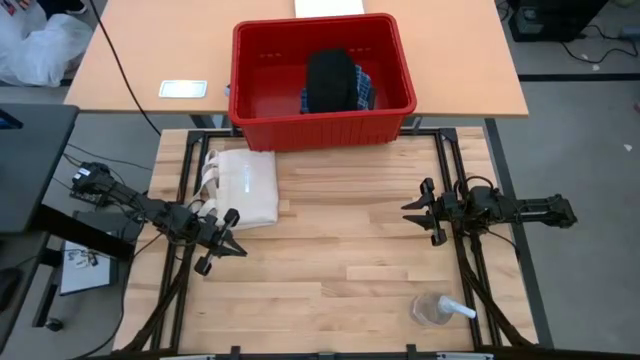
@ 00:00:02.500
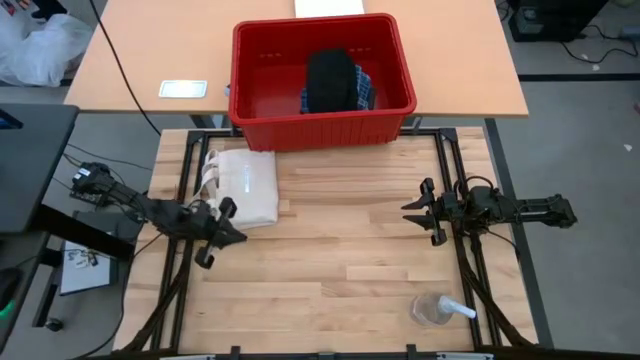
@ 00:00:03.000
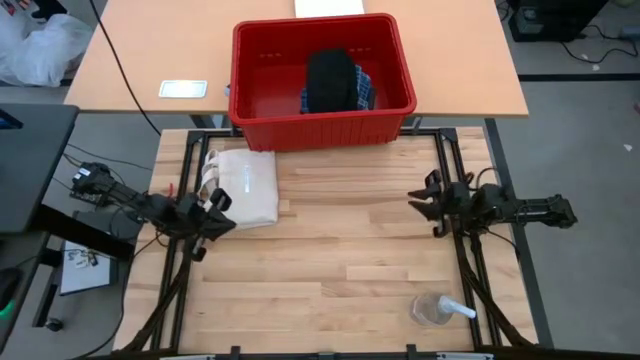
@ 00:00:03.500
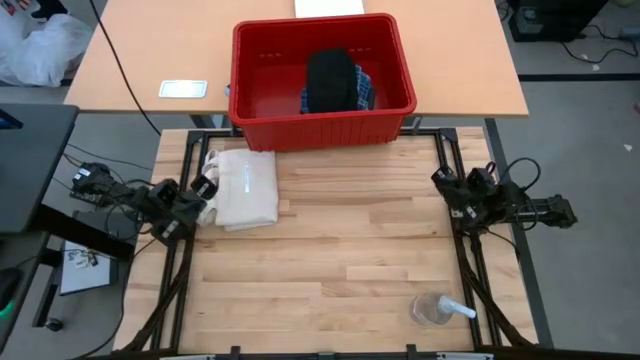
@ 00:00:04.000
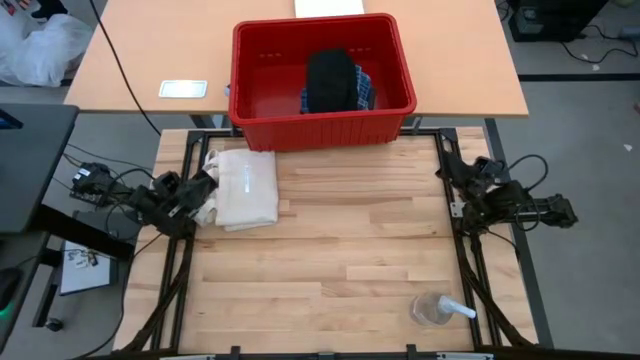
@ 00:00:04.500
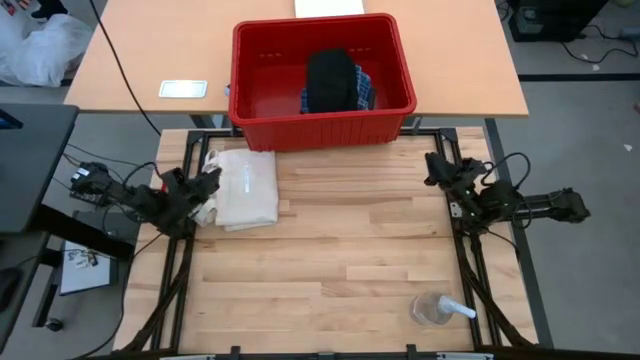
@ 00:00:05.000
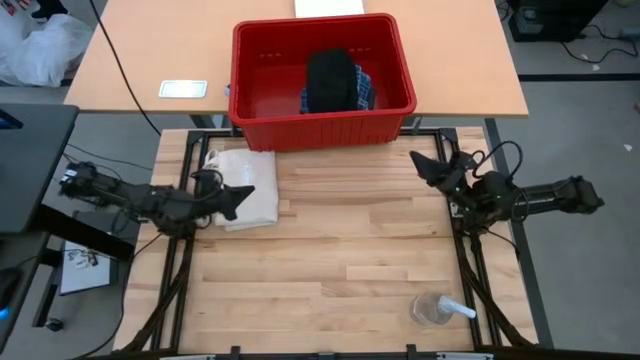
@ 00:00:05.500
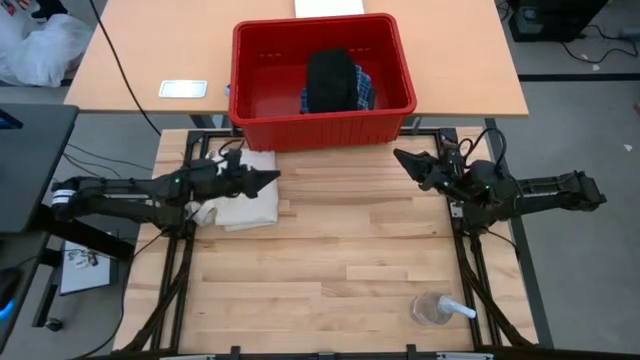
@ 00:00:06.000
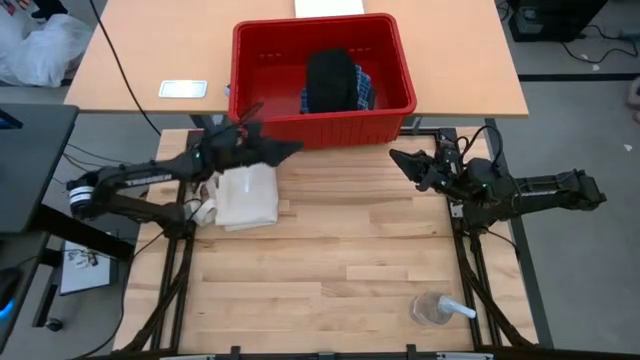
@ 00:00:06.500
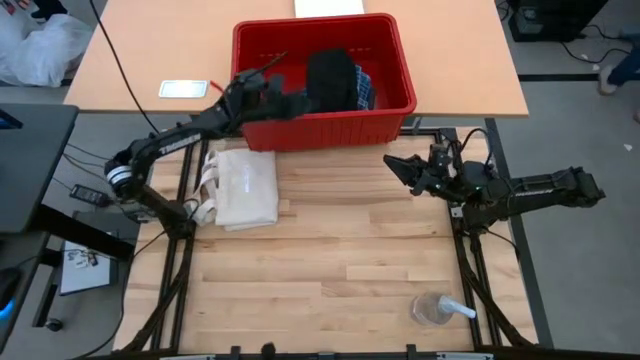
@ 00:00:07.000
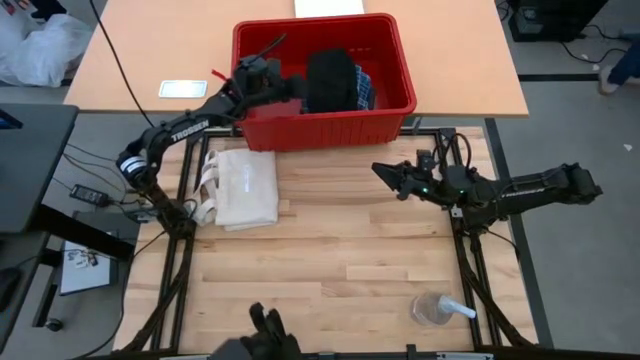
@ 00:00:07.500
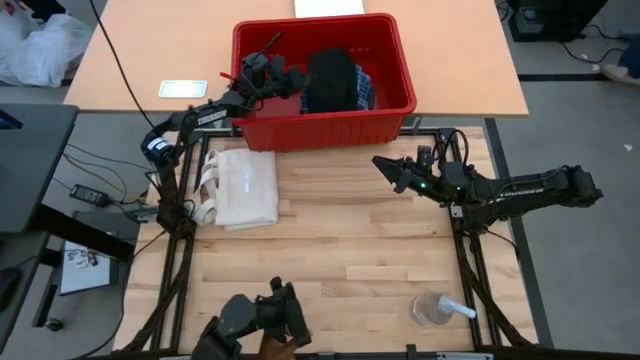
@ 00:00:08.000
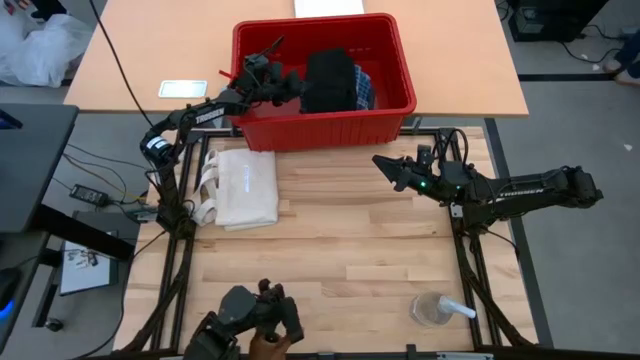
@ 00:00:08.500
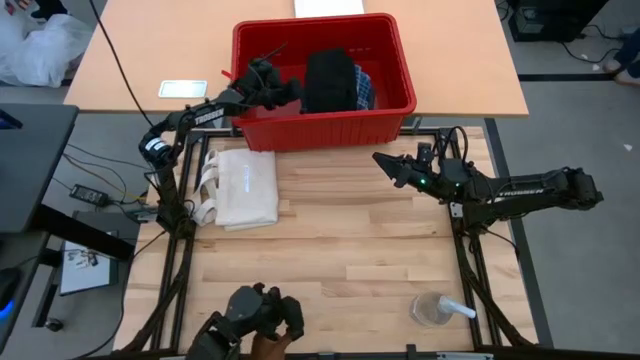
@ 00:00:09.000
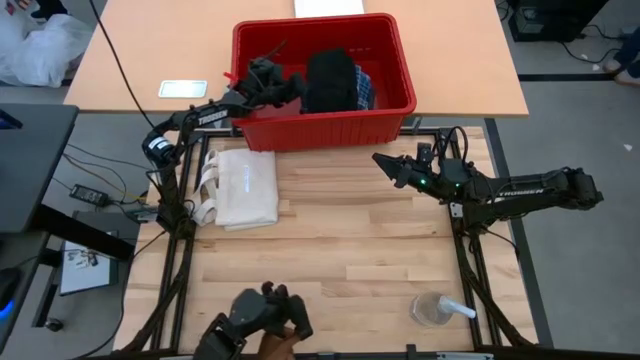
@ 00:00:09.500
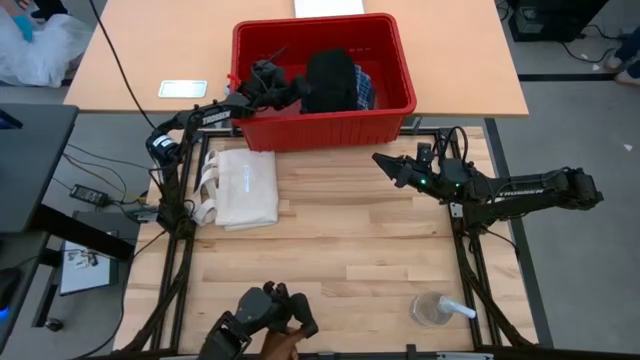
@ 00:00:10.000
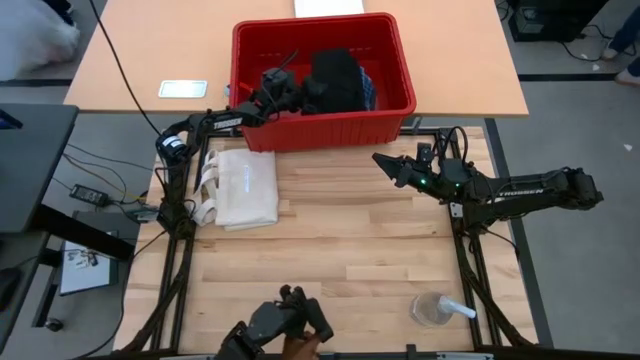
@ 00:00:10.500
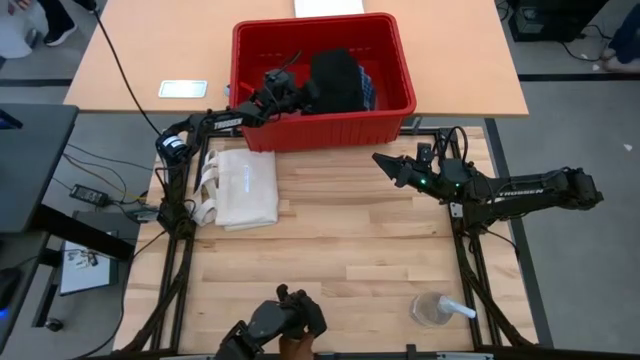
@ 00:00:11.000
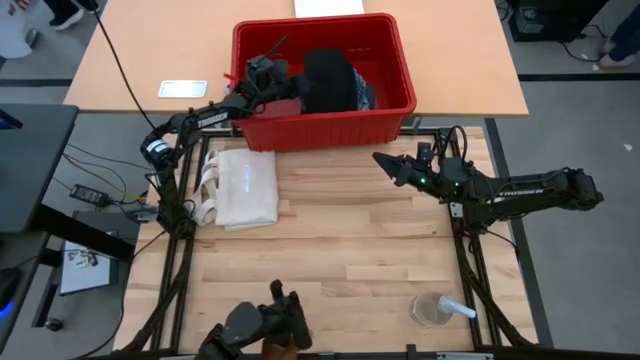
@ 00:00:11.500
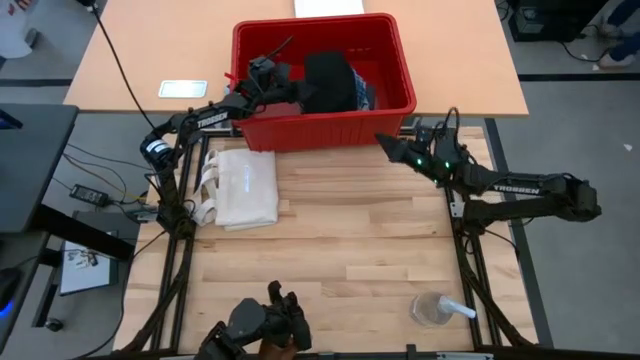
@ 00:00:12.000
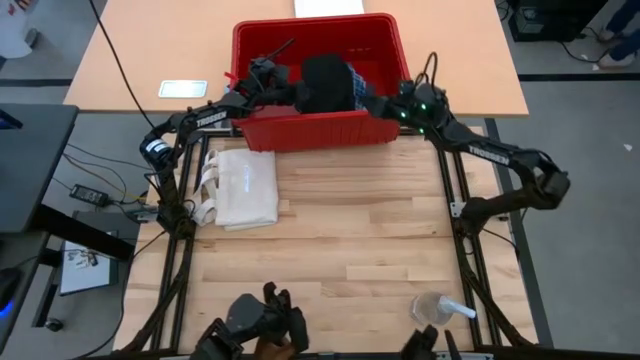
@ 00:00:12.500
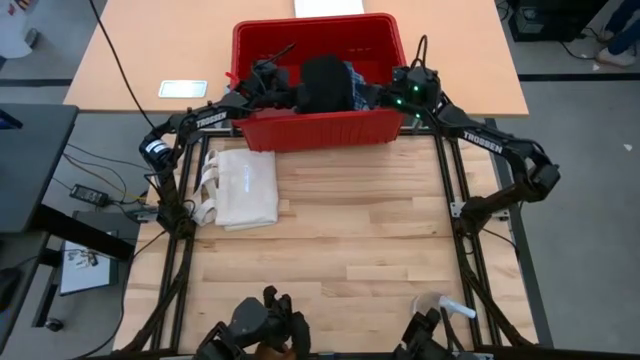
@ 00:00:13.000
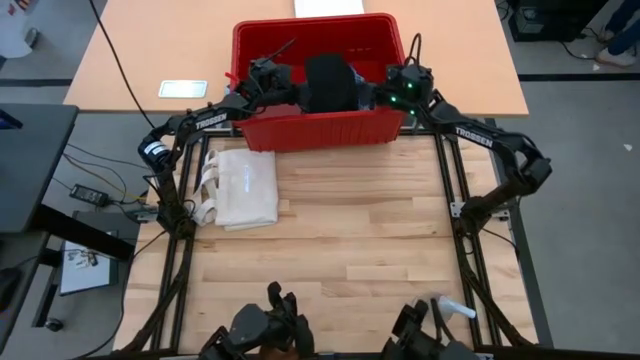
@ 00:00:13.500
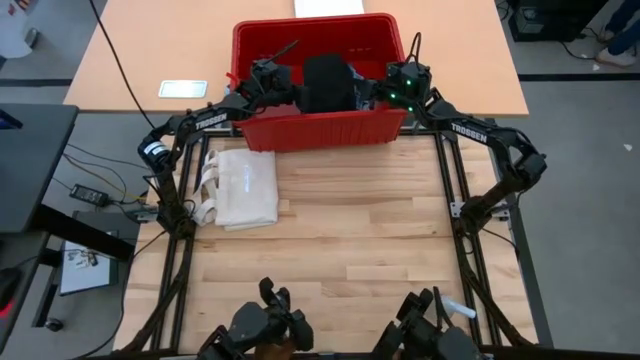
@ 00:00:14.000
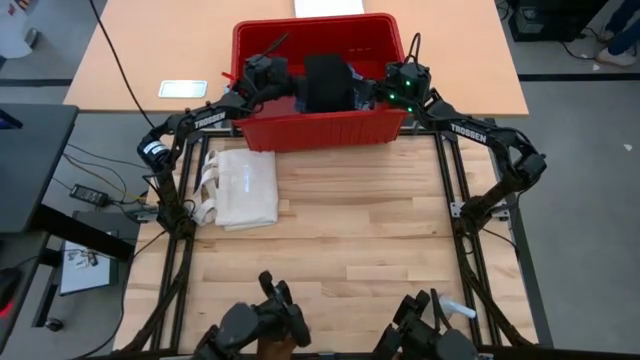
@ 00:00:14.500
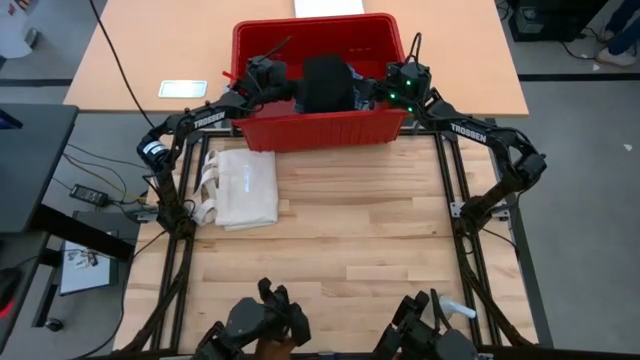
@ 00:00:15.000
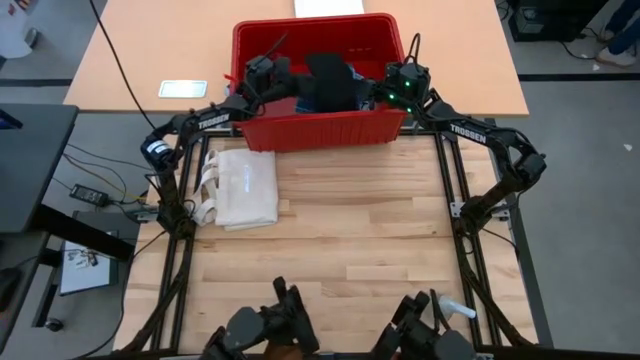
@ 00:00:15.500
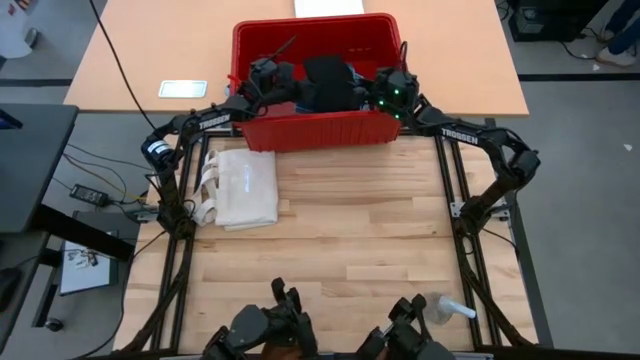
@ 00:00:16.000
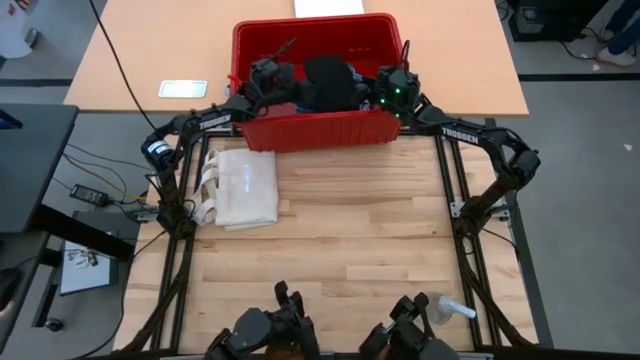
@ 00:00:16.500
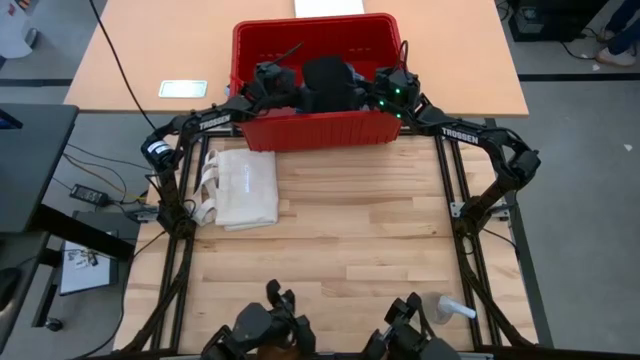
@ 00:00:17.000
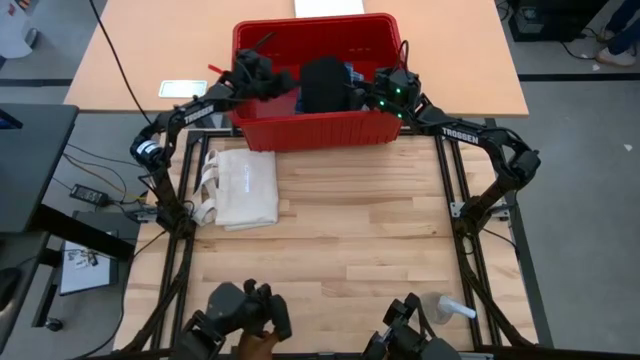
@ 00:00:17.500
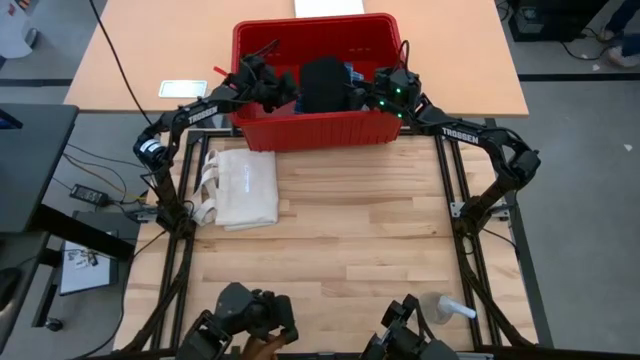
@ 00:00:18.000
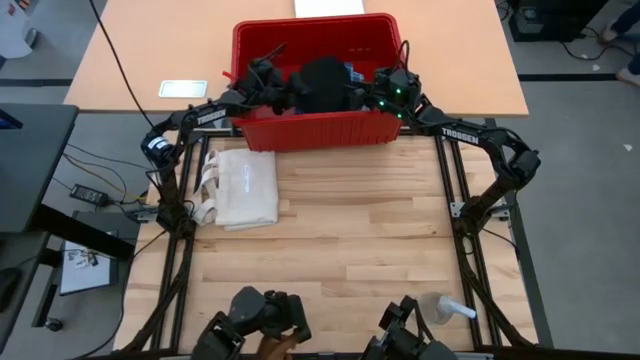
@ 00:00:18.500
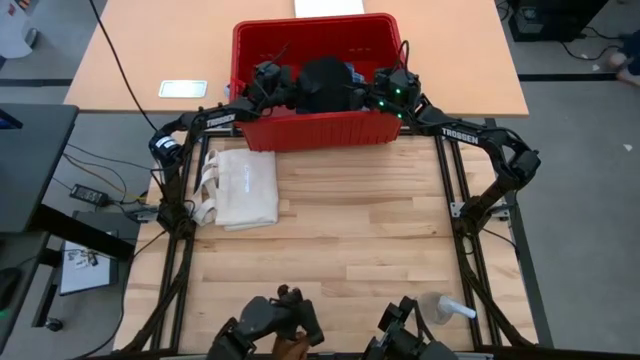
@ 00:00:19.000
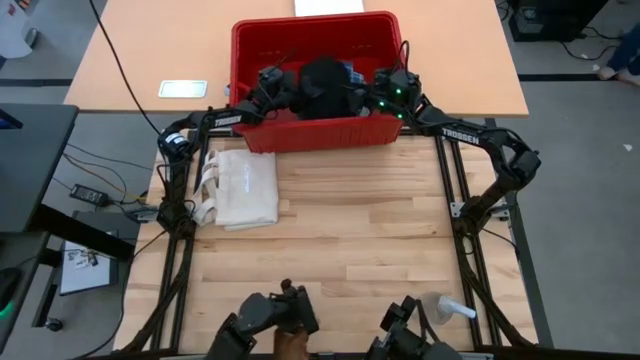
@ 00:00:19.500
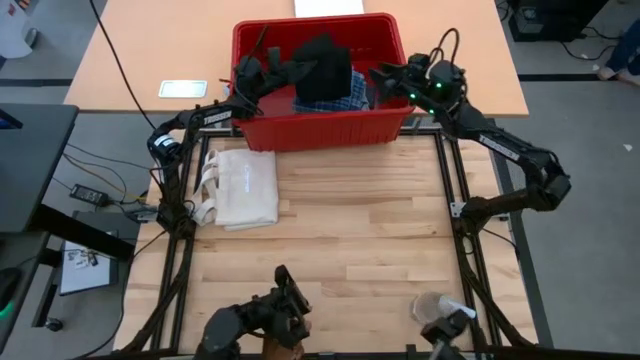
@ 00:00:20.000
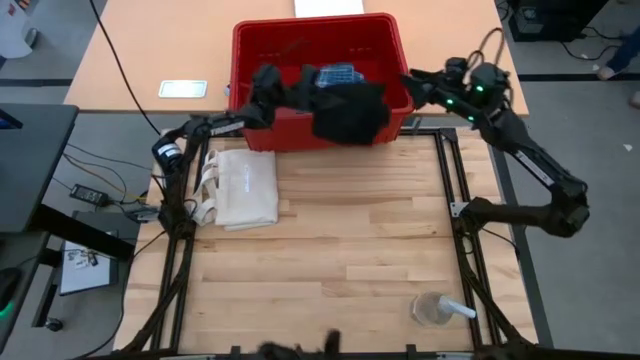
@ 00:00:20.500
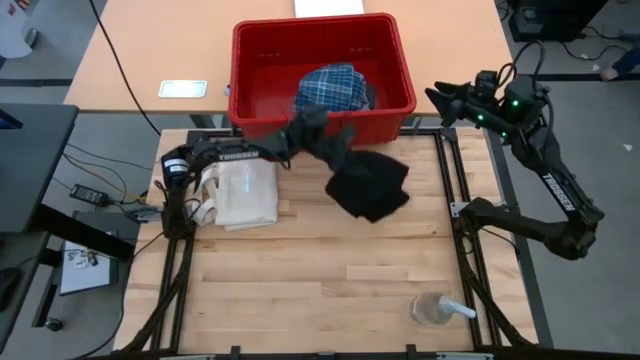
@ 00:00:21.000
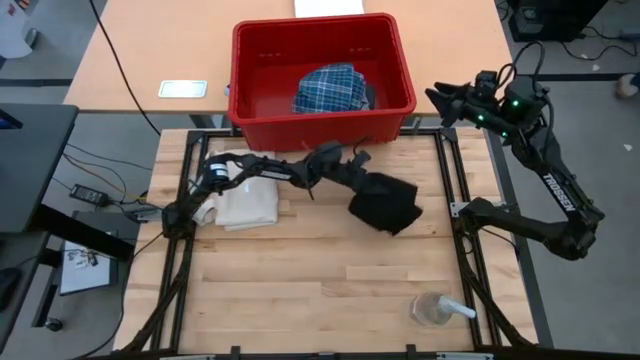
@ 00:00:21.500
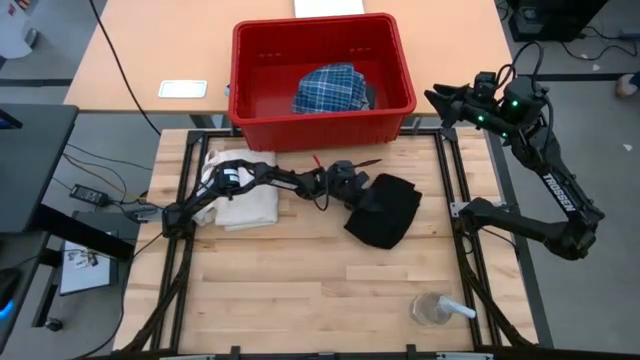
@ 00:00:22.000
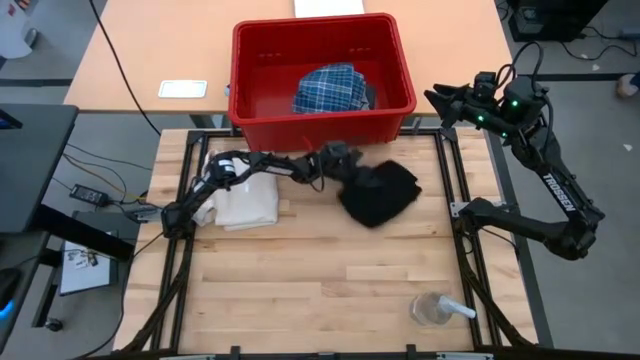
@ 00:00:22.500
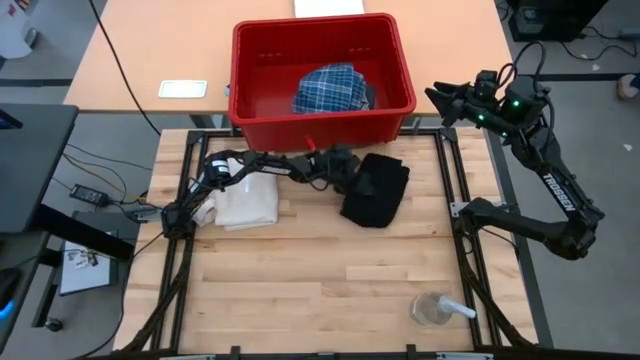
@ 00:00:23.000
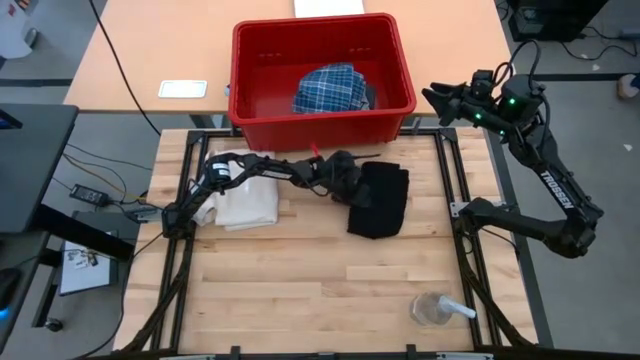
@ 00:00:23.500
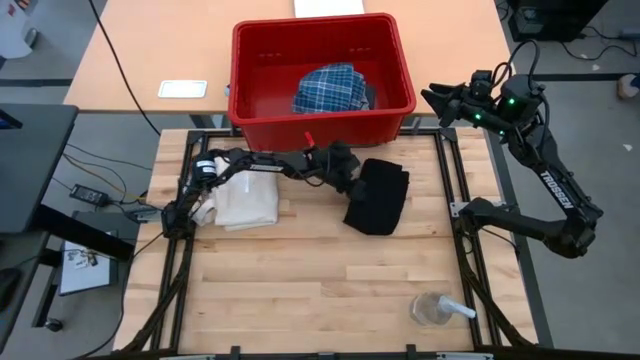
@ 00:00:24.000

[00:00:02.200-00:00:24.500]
Task: Fold laundry
Remove the black shorts from the red laundry bin
